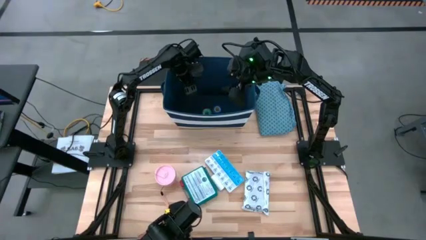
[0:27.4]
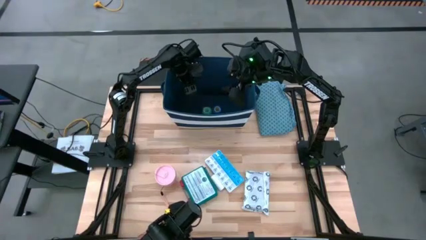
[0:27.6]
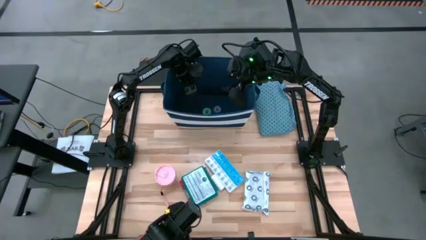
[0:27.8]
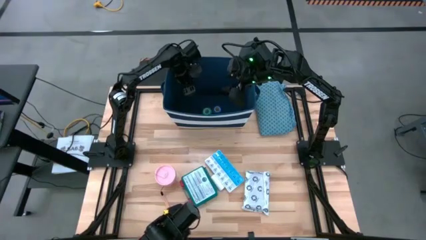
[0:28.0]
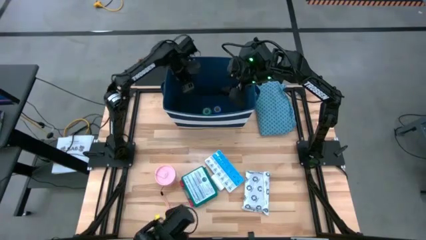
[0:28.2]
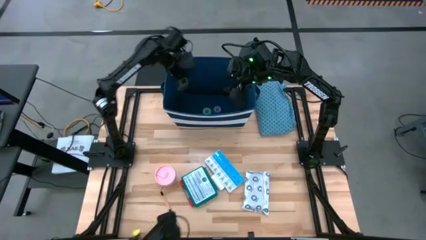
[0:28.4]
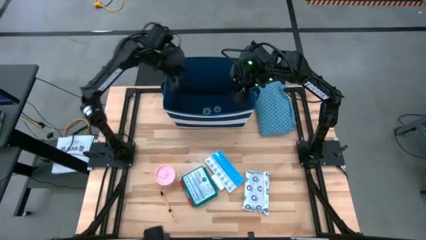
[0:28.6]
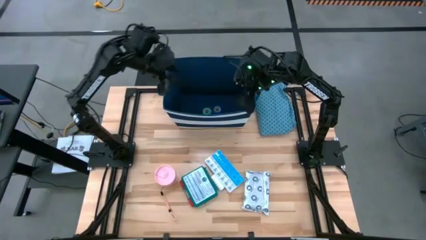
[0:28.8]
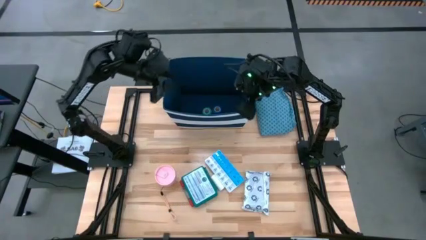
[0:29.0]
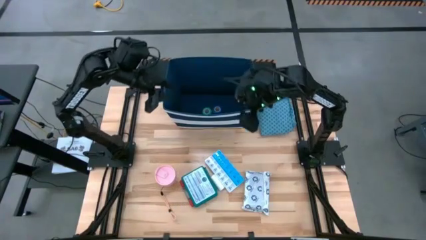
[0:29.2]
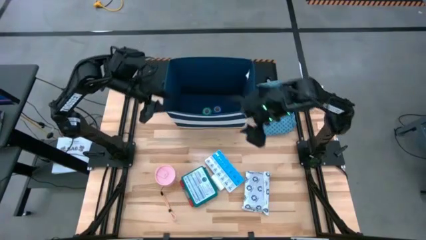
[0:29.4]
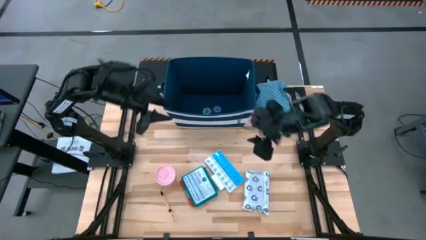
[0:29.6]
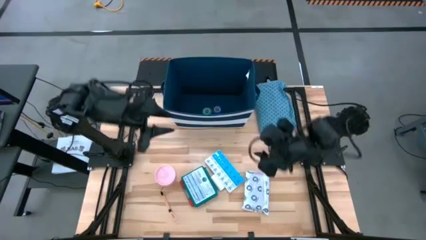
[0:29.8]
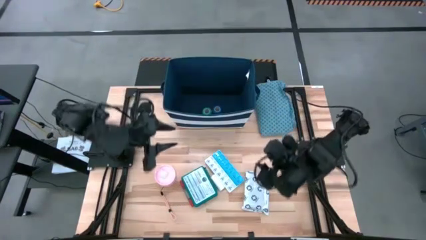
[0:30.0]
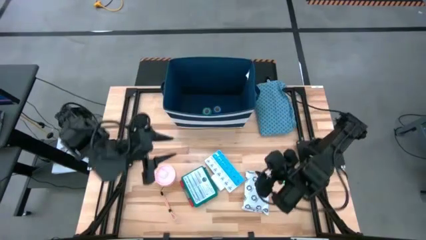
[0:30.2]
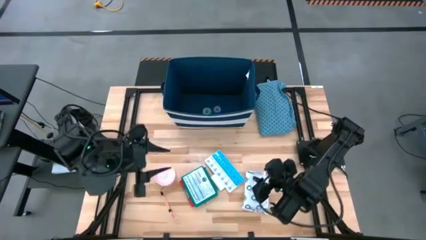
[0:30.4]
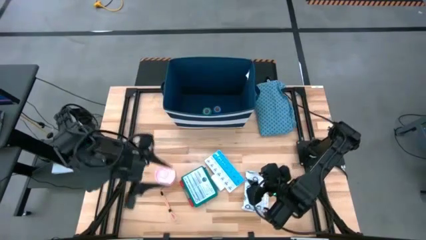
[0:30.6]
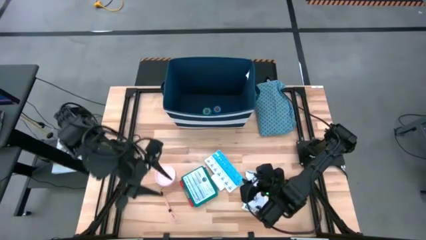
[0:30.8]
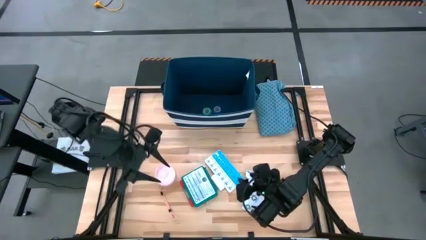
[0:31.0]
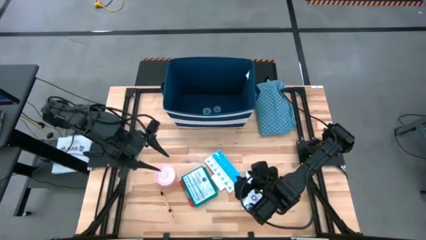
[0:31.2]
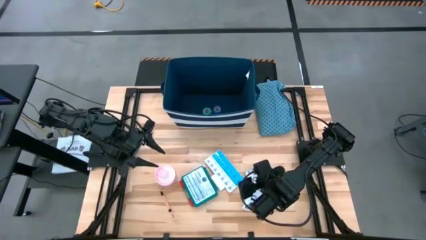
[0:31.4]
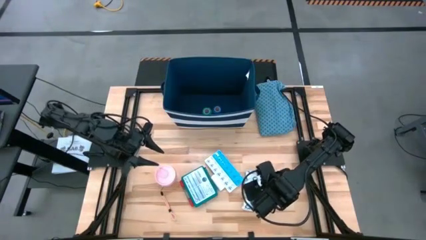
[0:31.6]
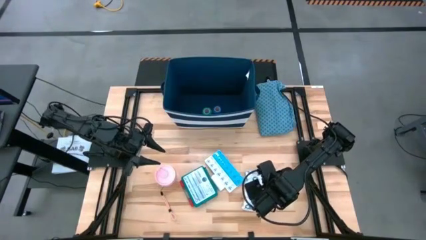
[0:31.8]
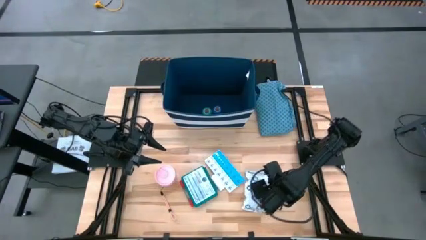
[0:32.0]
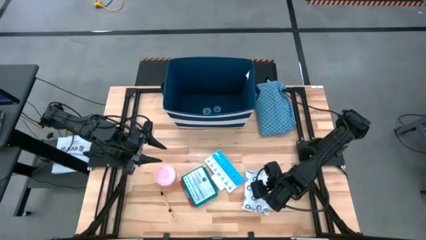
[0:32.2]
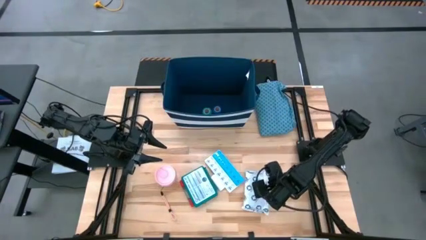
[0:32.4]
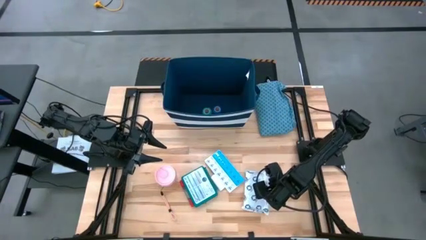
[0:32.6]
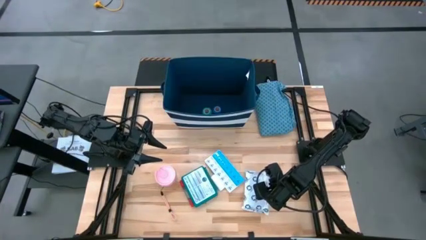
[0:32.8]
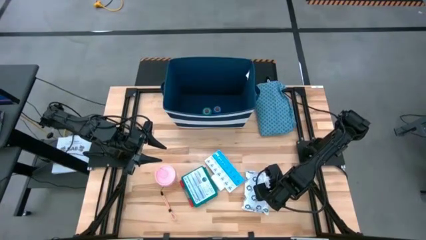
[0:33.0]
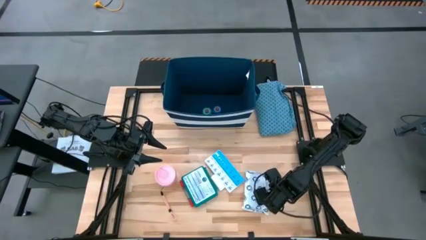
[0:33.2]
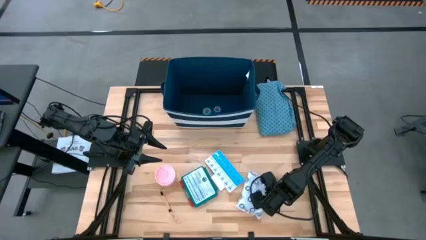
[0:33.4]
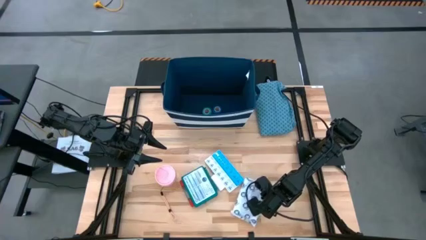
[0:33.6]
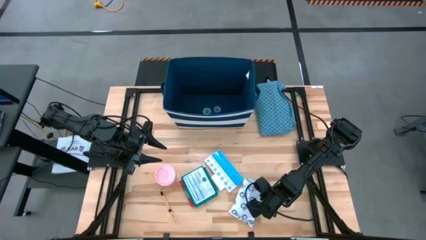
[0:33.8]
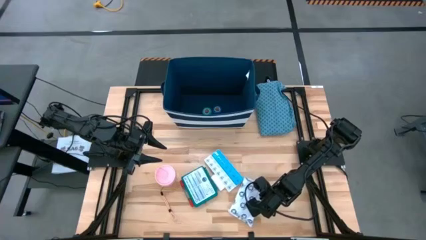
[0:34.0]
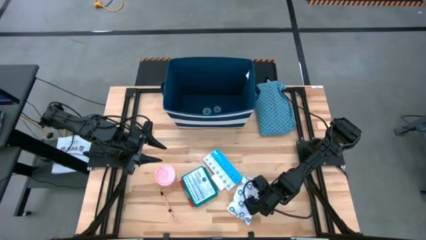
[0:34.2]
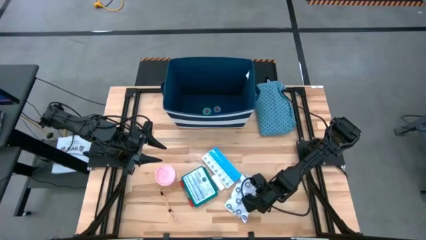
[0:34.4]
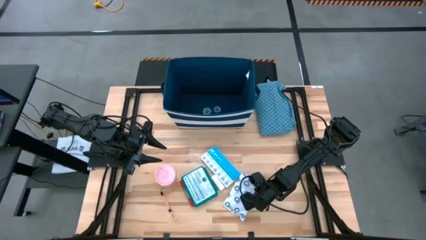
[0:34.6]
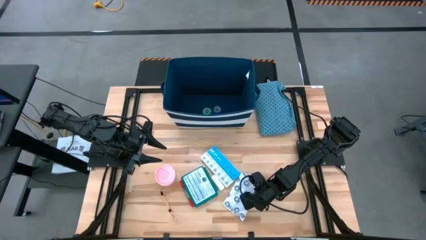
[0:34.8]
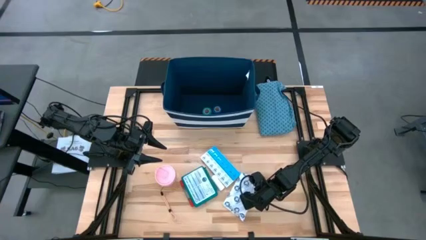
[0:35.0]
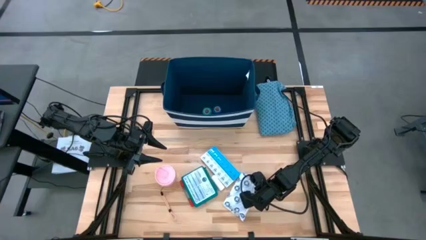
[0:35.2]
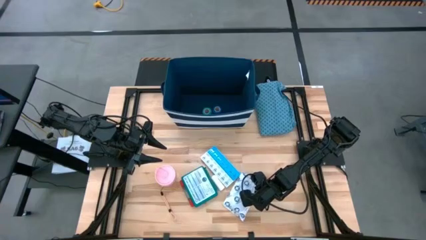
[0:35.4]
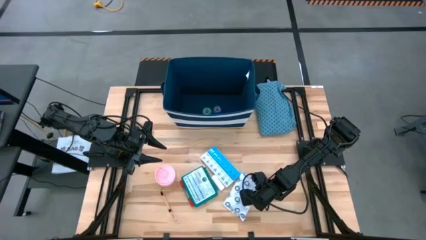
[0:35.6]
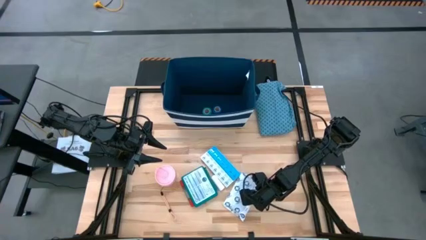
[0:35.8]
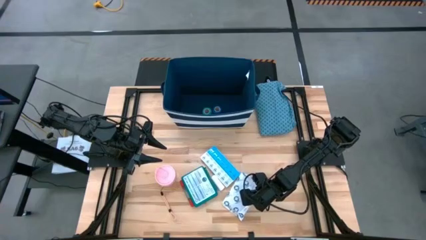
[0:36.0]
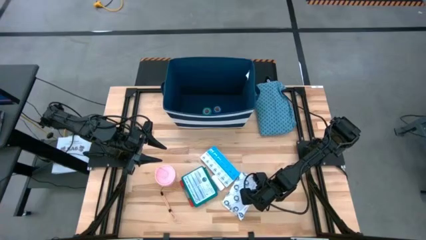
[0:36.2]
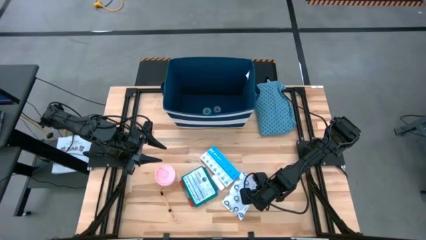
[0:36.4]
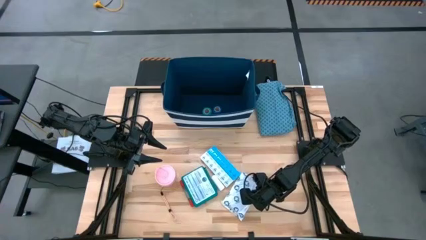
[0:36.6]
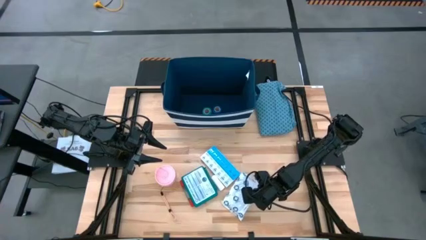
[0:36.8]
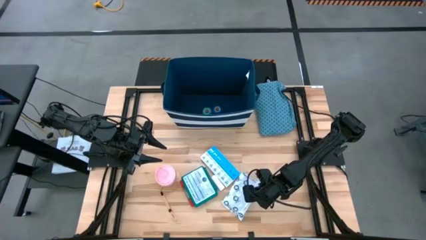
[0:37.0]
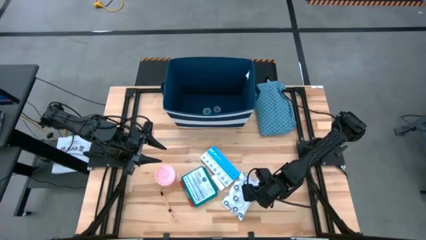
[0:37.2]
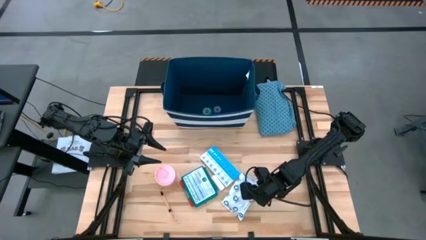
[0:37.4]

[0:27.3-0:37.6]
Task: Pick & place medical supplies in basket/bin
Put the mailer bag into the bin

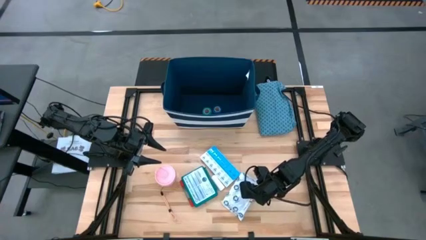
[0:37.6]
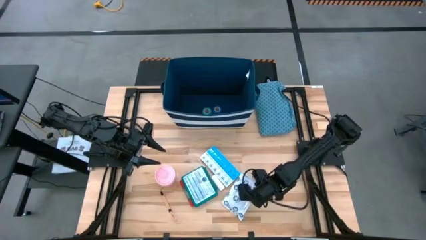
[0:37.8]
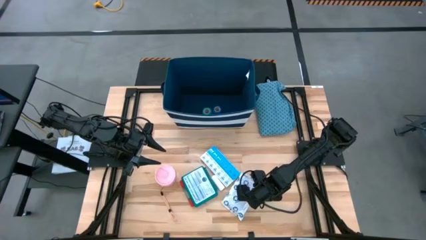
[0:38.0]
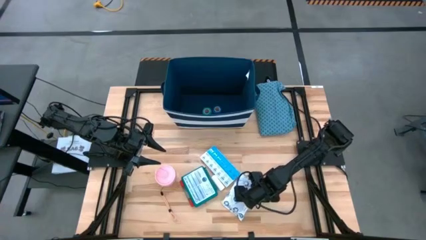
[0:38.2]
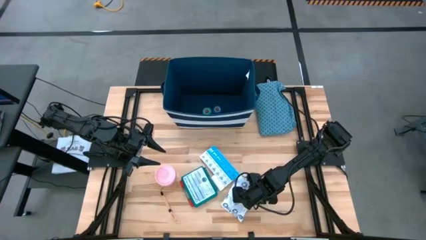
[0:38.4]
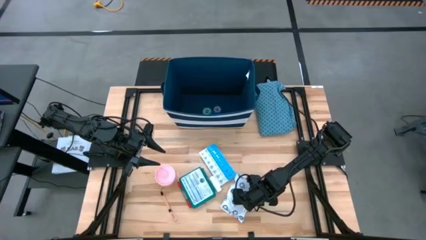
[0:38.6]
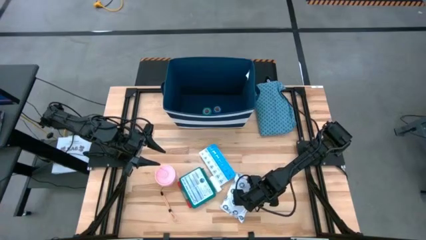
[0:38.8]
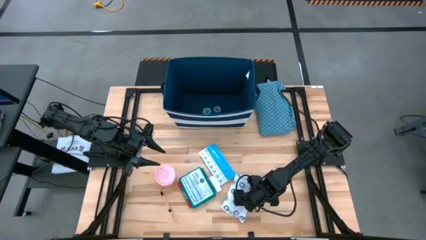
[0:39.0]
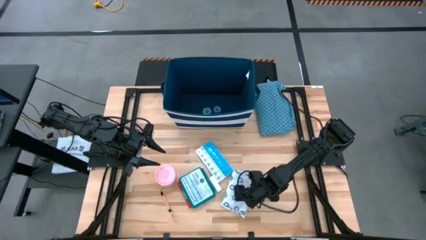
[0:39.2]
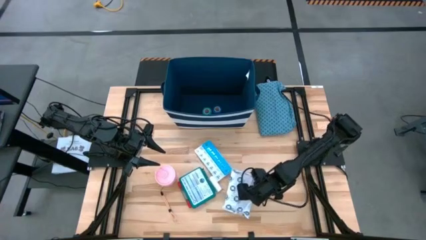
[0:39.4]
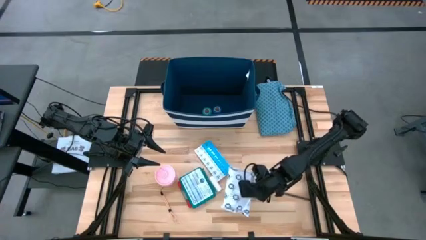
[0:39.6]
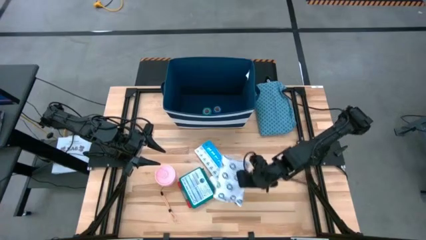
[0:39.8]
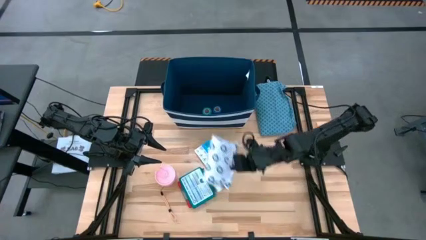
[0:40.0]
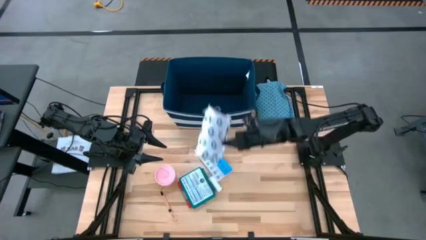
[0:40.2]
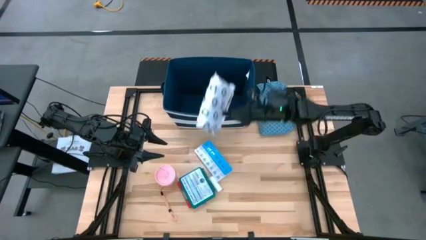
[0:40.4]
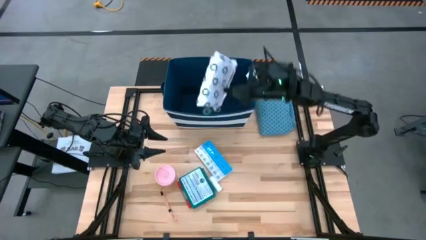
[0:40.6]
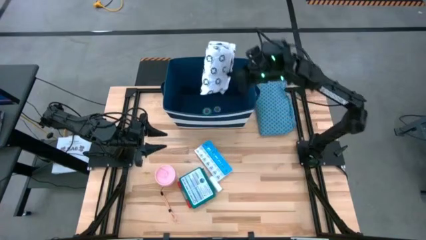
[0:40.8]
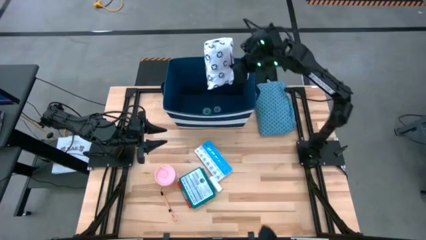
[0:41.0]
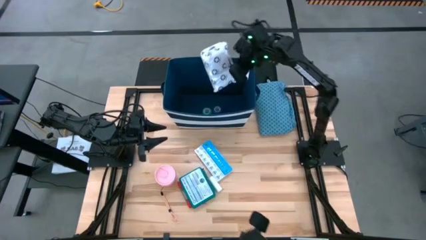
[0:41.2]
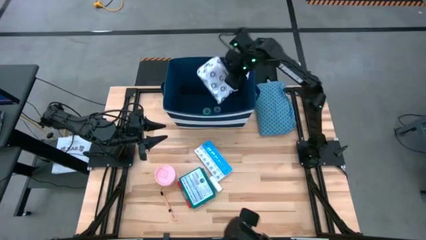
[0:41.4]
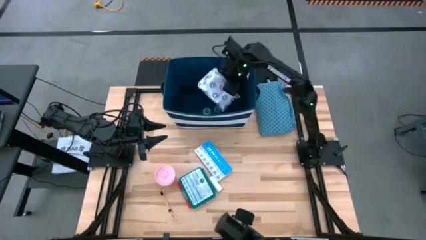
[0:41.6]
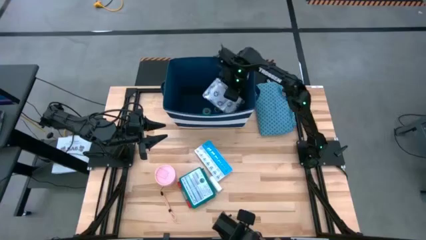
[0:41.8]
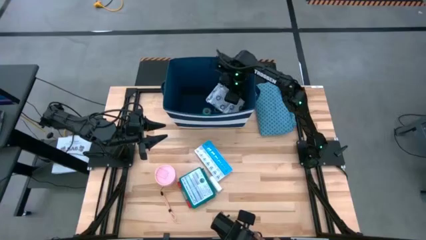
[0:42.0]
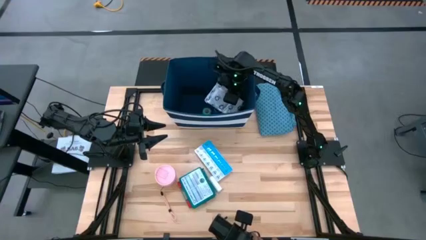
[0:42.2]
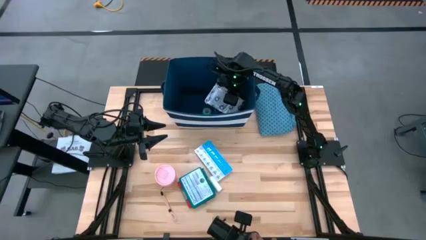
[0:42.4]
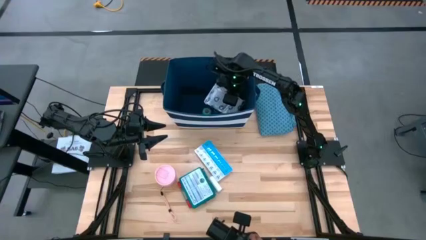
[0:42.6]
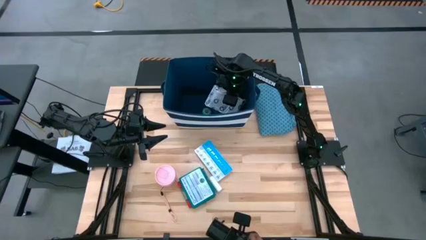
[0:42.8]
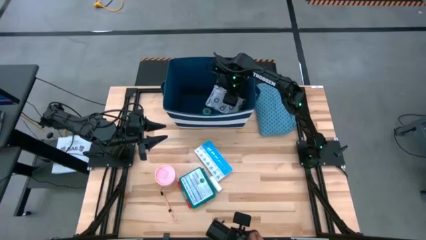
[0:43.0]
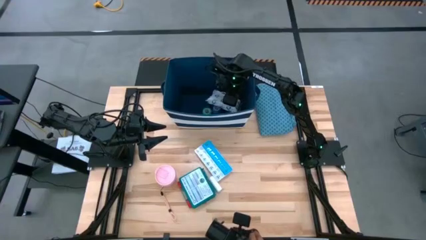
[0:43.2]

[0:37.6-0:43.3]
Put the mailer bag into the bin
